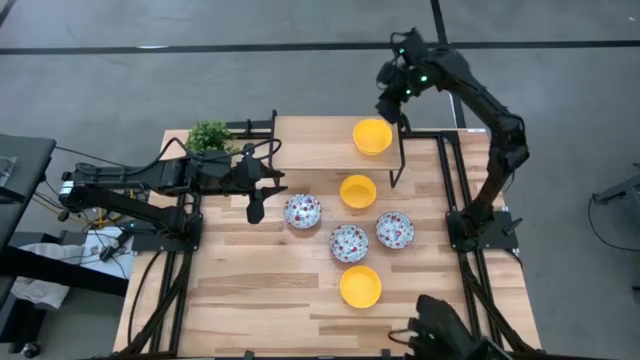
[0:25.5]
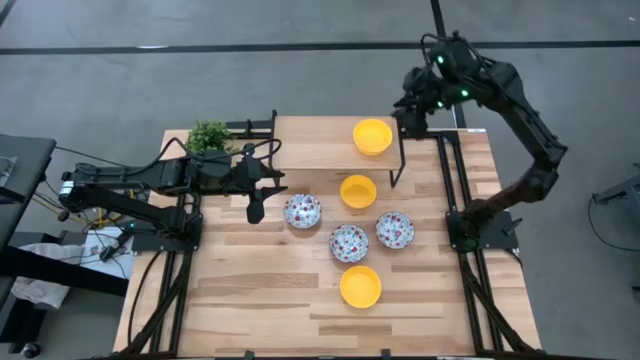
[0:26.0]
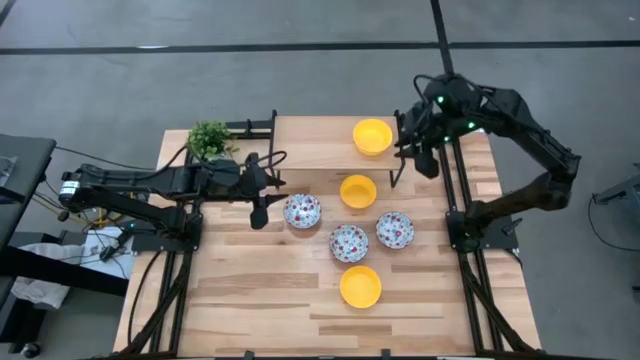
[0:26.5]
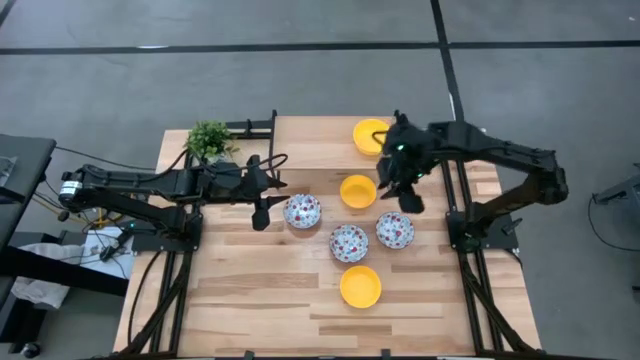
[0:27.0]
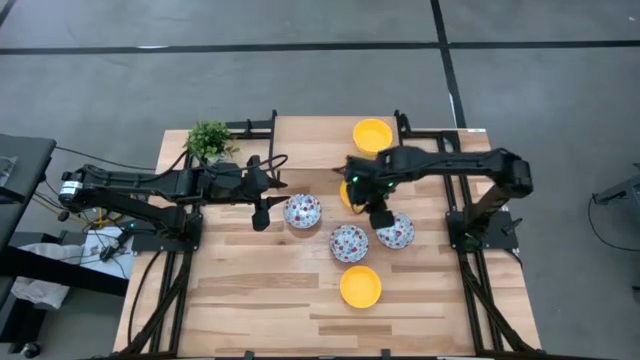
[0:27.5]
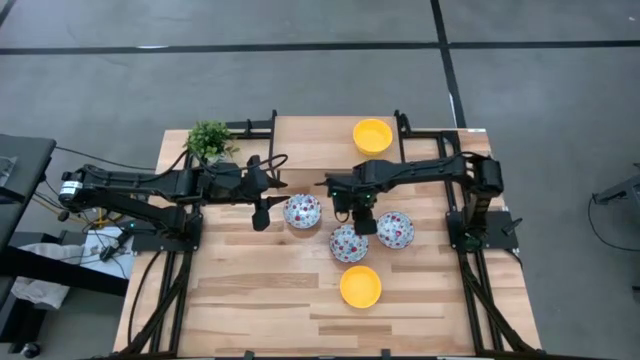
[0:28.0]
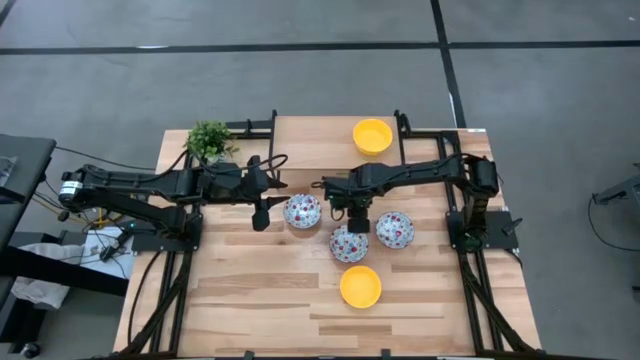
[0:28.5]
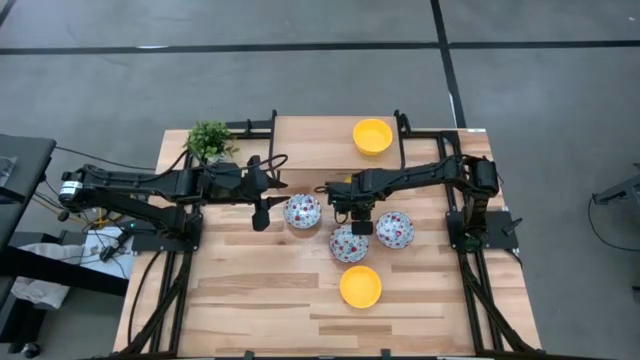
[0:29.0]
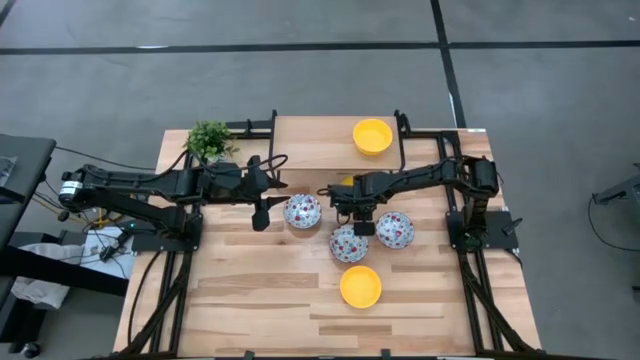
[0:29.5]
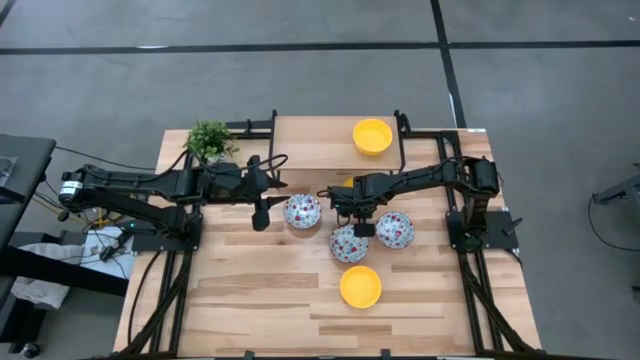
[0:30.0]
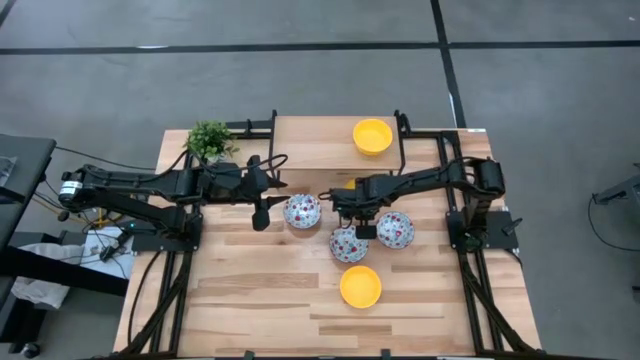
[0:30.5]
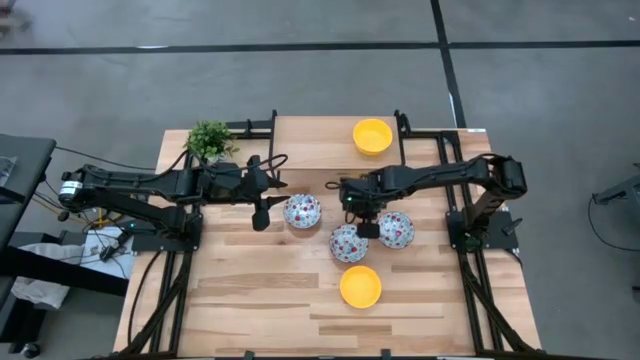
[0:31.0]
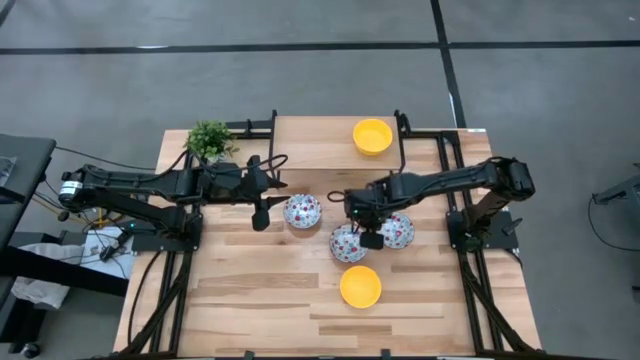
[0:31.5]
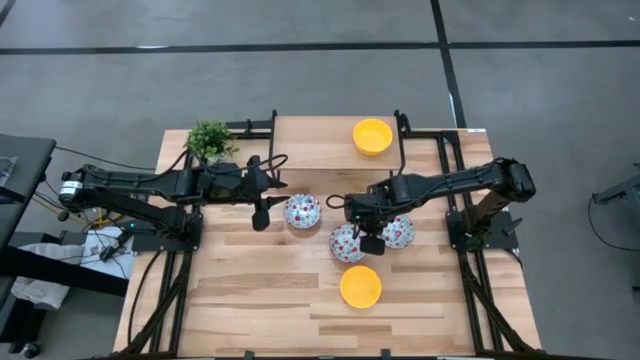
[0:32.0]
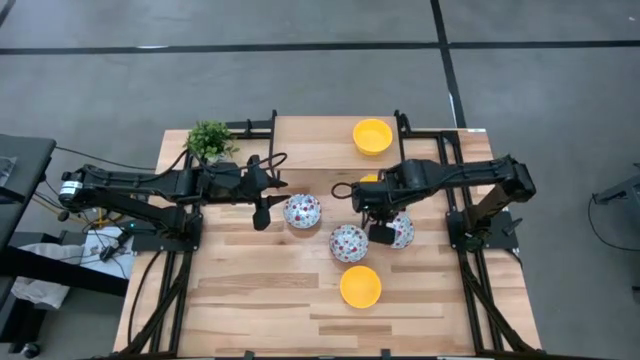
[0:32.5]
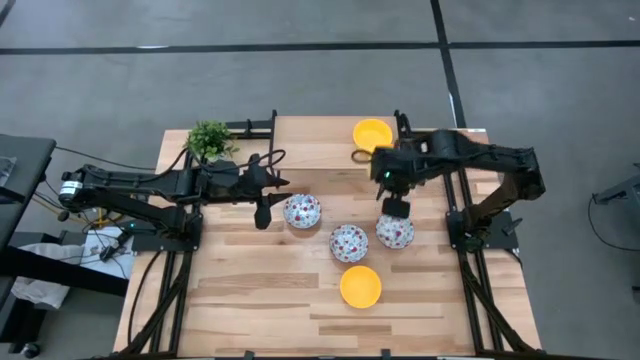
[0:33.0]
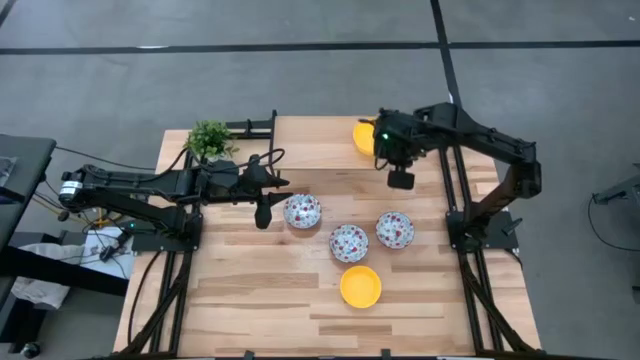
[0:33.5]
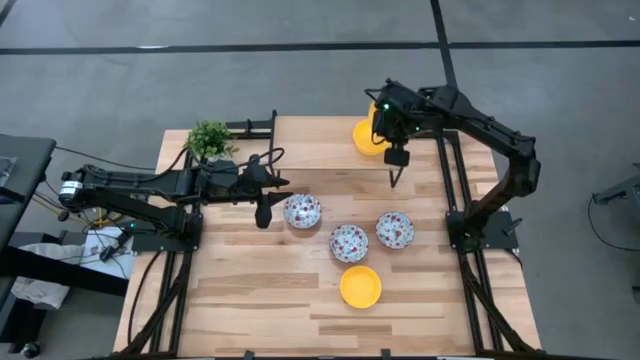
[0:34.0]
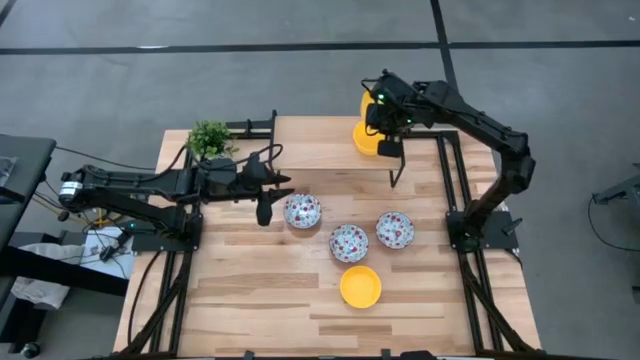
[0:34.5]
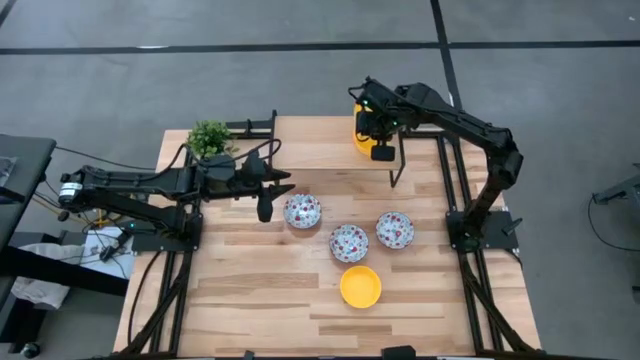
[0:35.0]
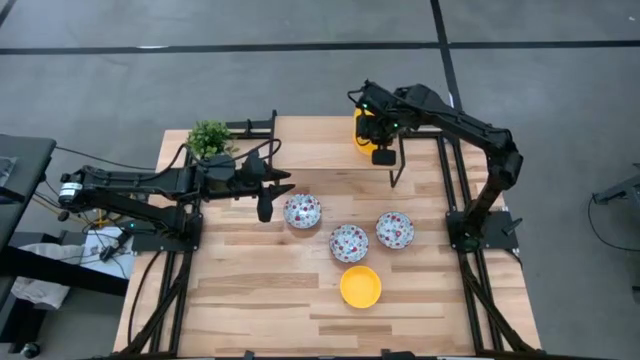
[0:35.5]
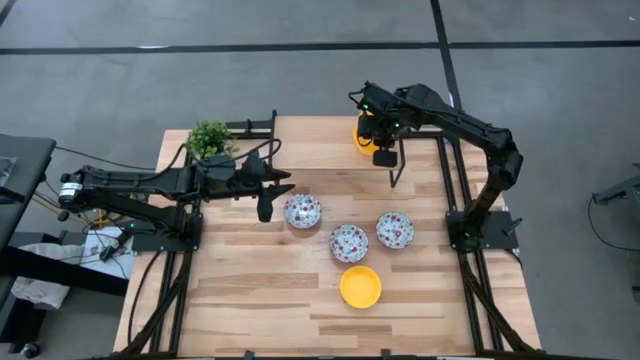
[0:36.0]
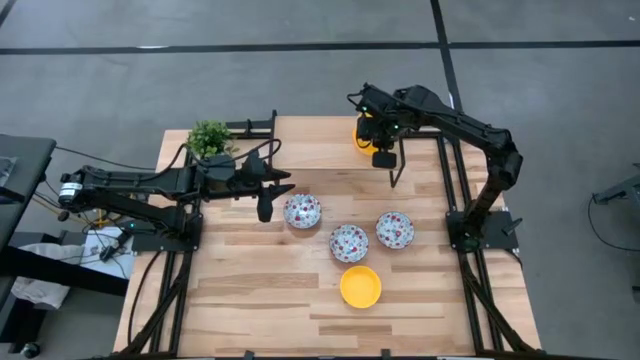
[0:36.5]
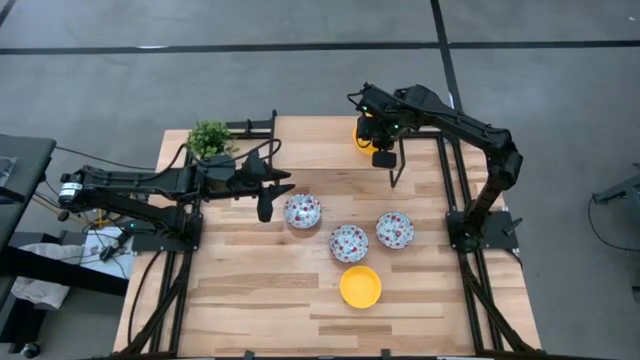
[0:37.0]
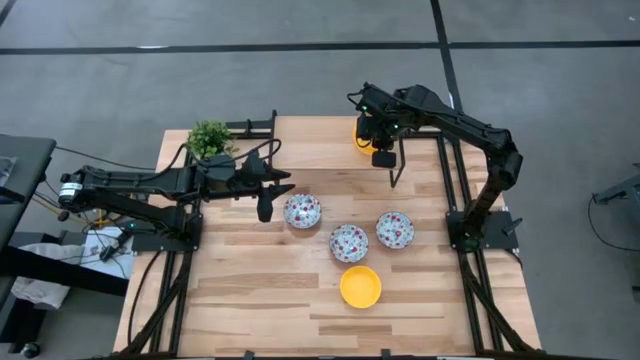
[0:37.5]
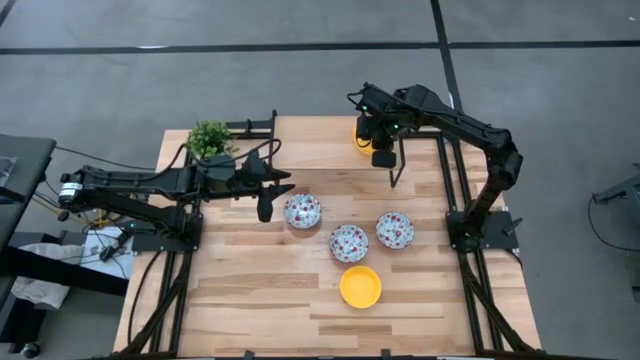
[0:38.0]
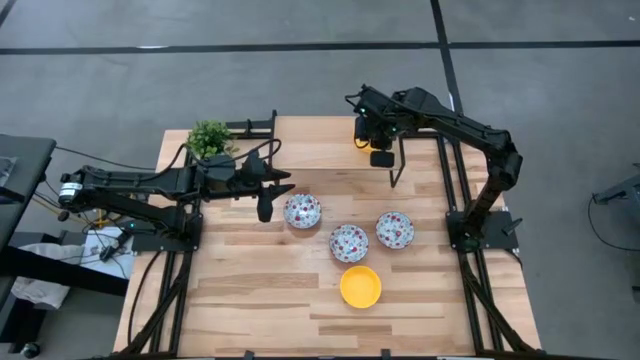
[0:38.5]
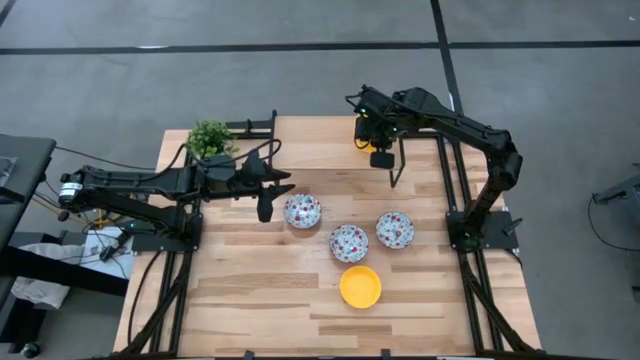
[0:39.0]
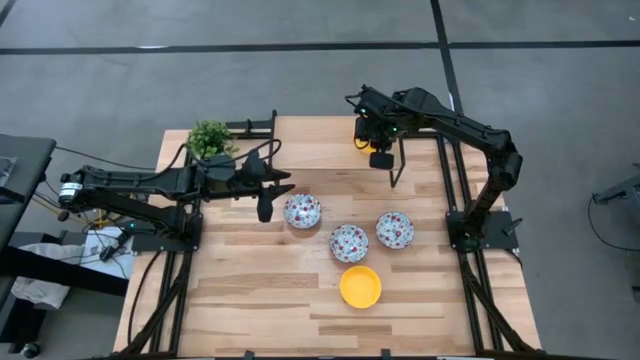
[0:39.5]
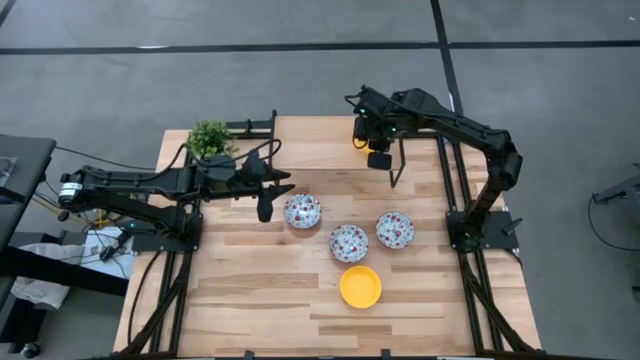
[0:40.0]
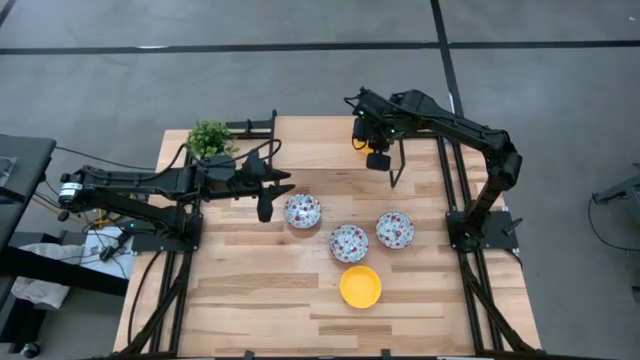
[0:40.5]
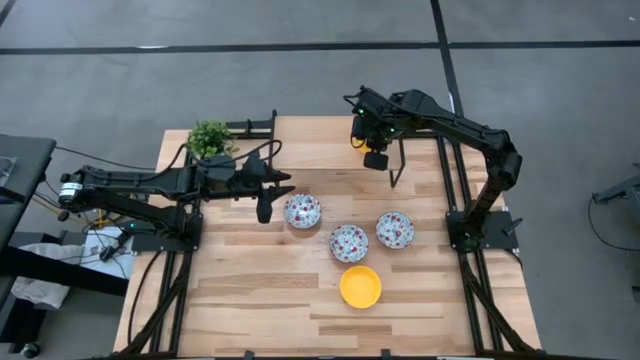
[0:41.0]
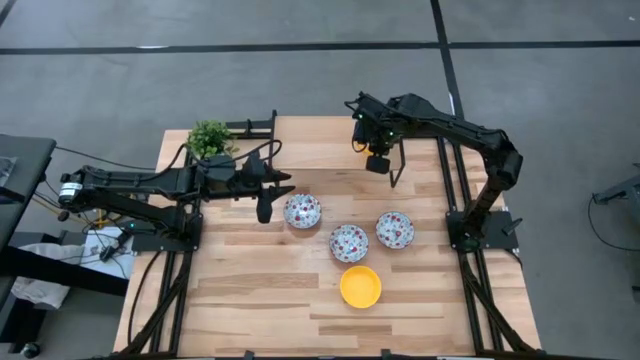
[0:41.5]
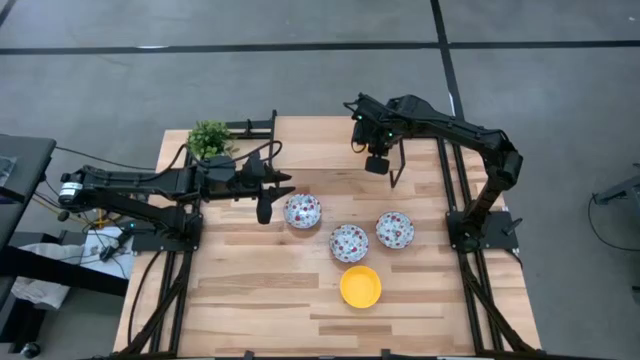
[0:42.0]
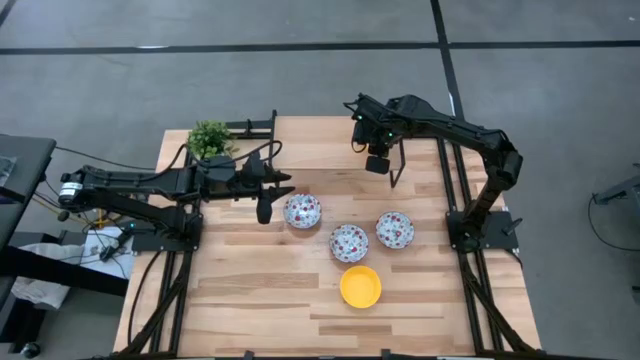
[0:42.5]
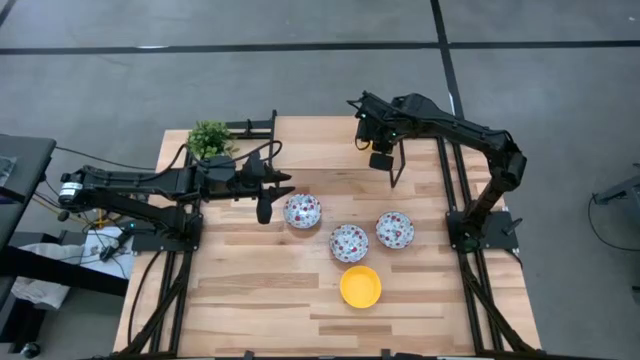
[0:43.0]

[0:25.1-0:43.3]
Task: Pick & Place Mini bowls
Stack the top yellow bowl on top of the yellow bowl on the shelf

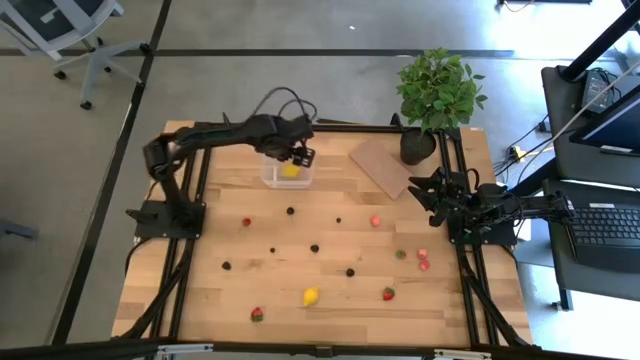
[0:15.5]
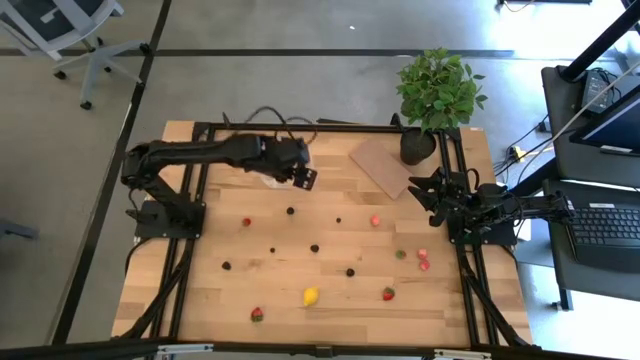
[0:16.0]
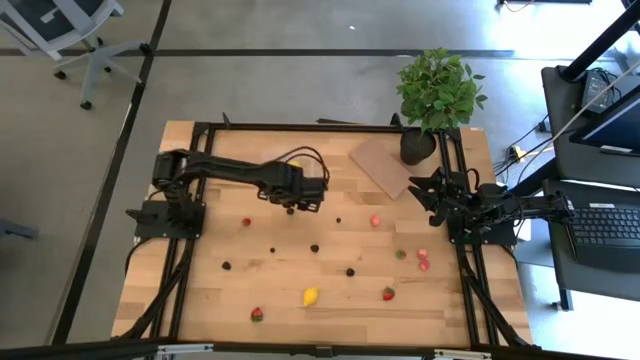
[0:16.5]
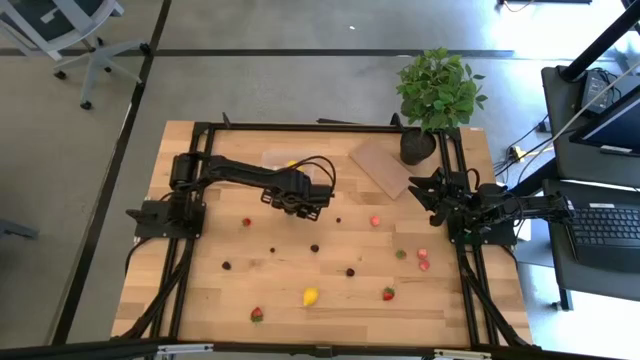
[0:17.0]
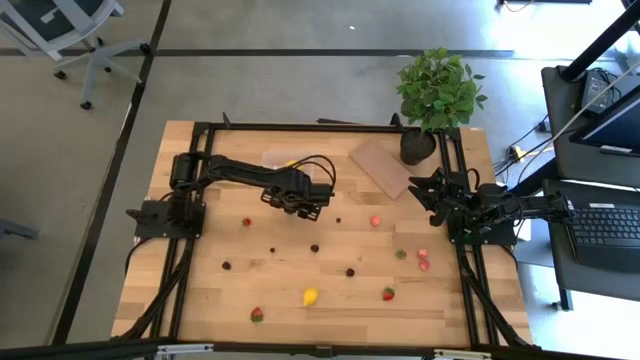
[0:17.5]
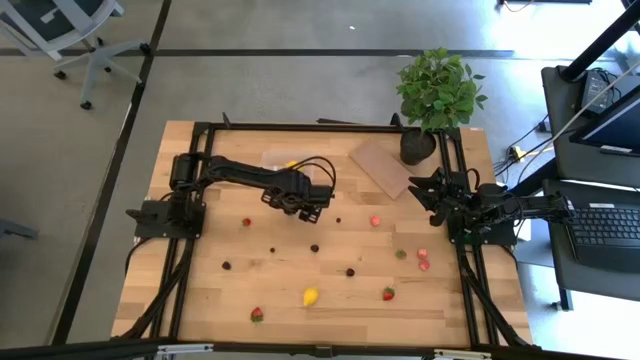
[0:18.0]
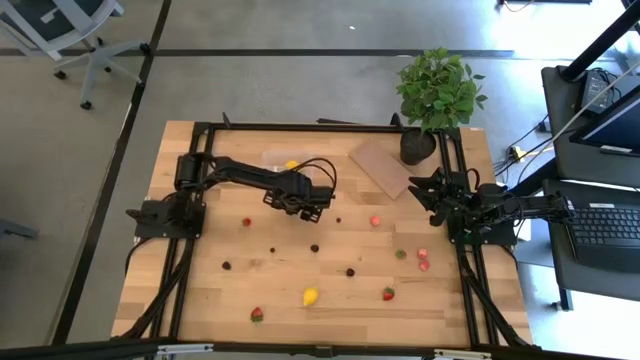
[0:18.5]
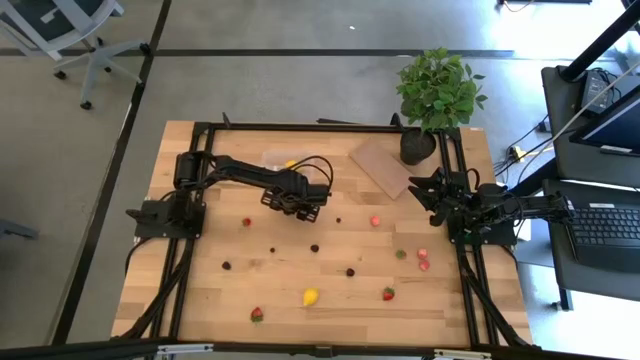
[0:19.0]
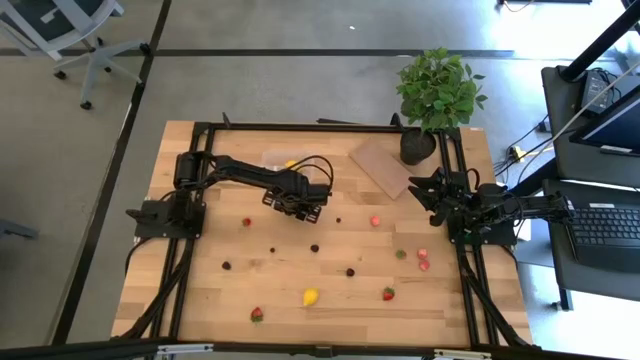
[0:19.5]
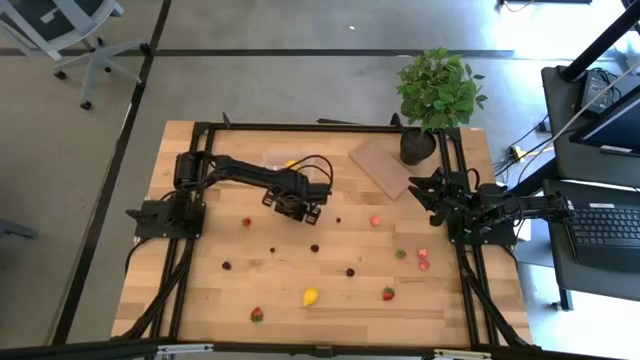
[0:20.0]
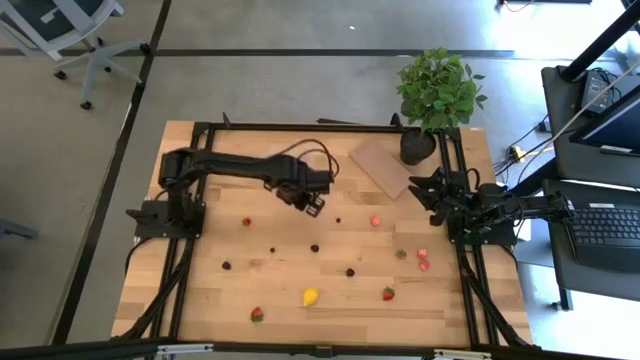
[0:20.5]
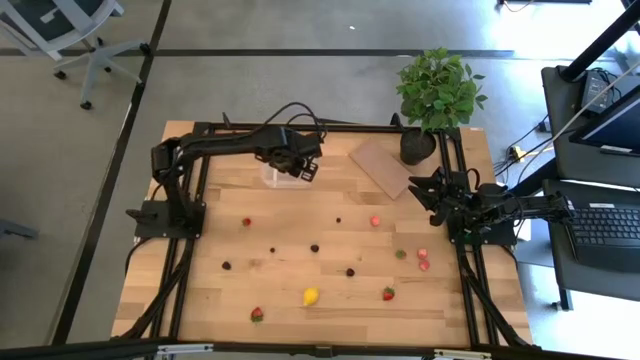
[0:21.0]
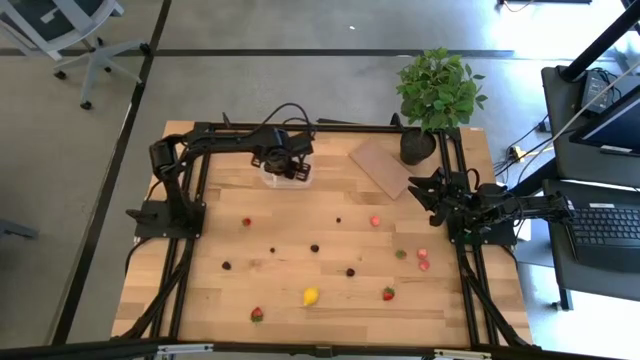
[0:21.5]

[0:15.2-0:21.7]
Task: Pick and placing Produce into tupperware
Put the black cherry into the transparent bin
